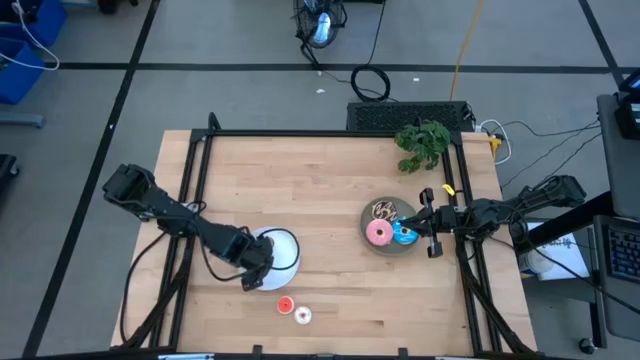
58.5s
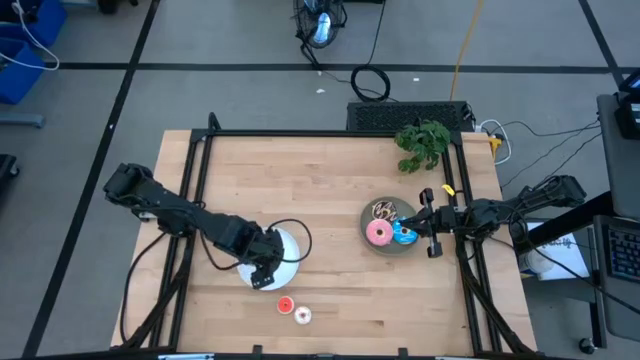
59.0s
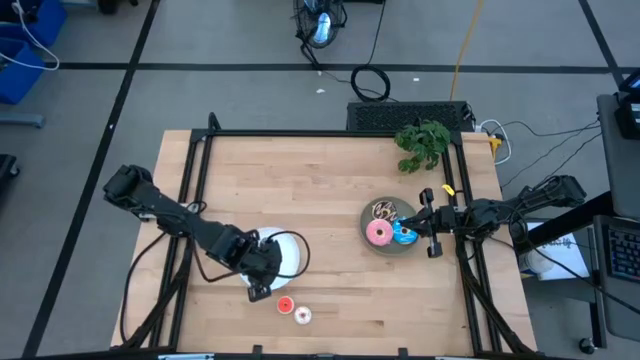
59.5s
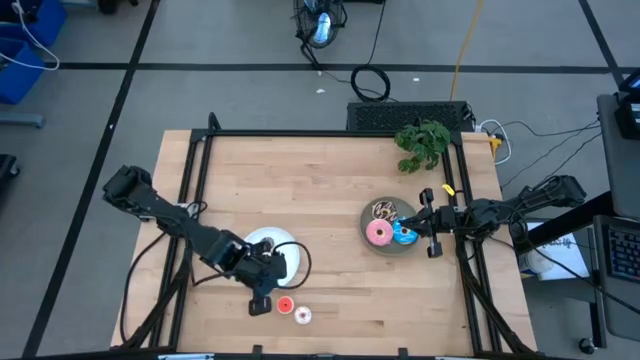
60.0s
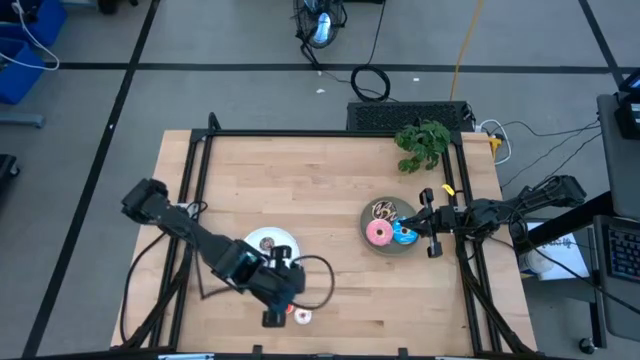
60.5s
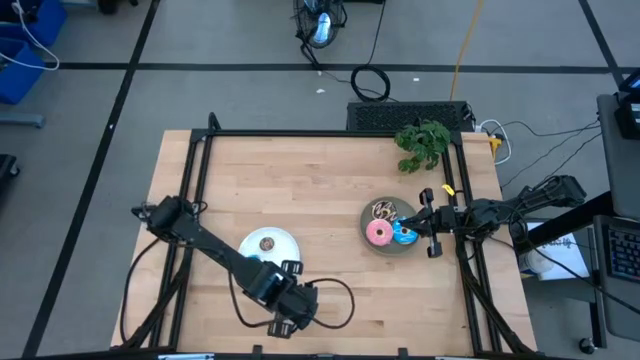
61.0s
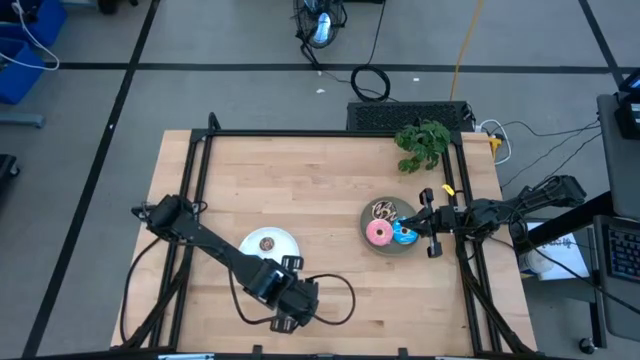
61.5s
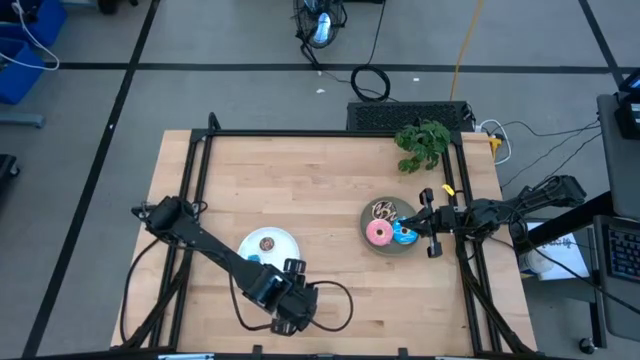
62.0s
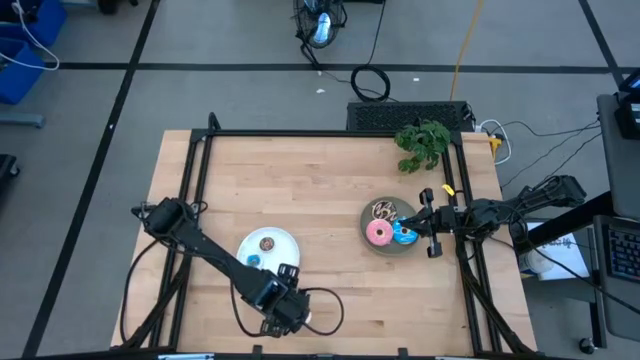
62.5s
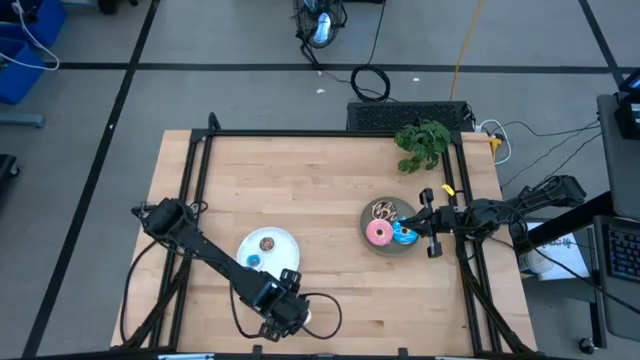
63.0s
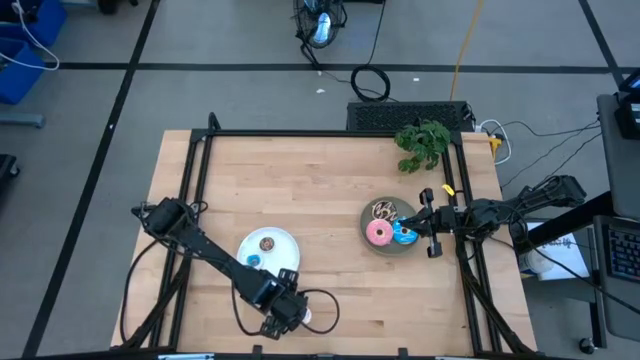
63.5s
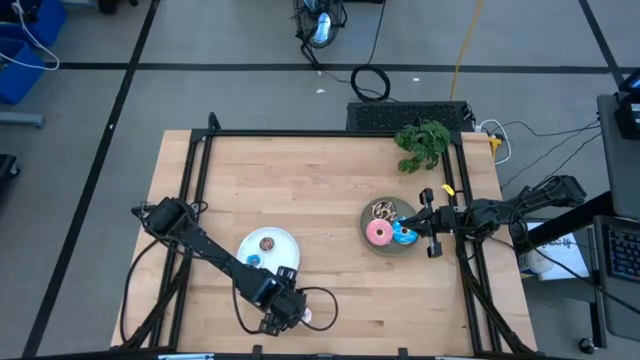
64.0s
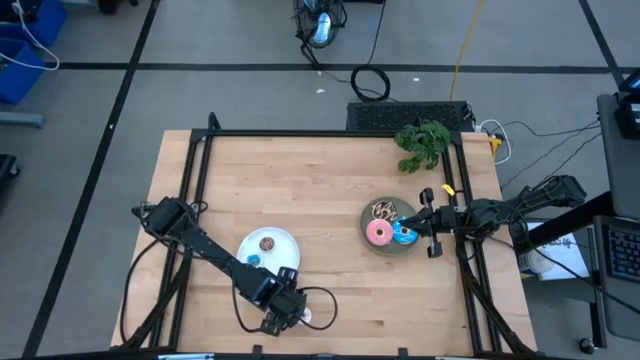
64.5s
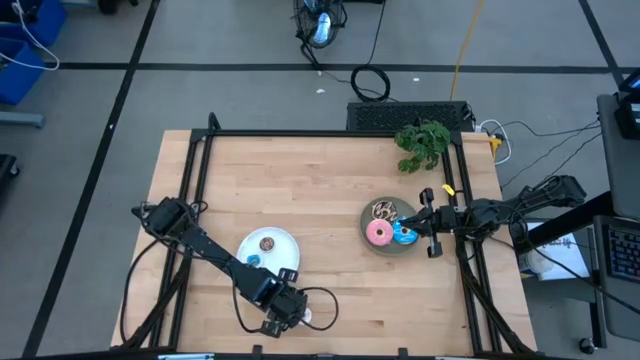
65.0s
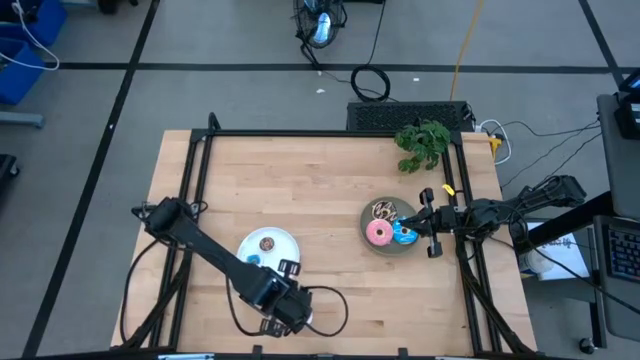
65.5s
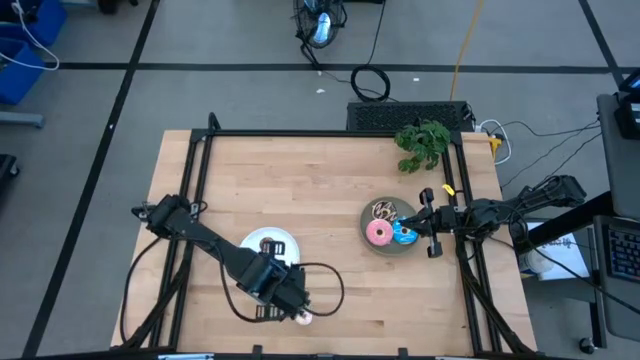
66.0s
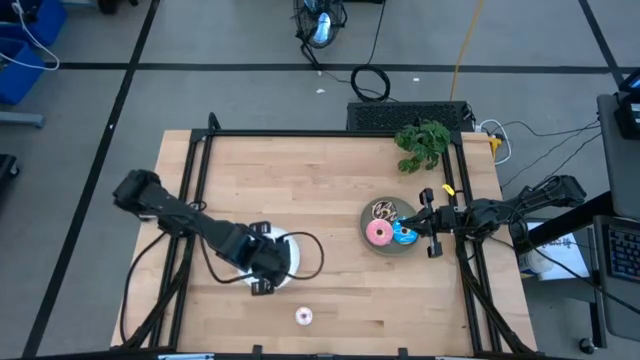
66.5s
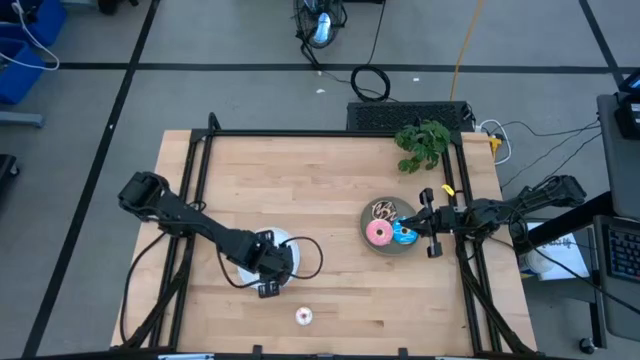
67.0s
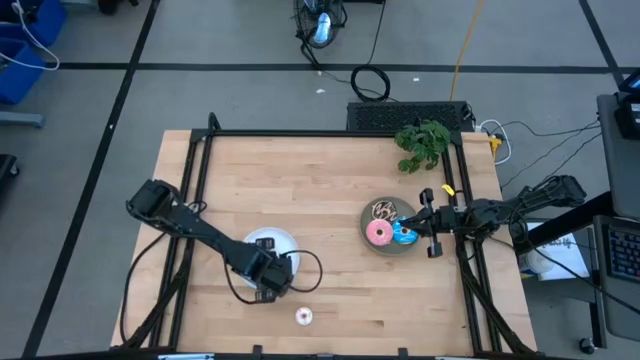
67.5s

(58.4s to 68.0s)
Task: Pick & Place donuts
Put the small orange donut on the white plate

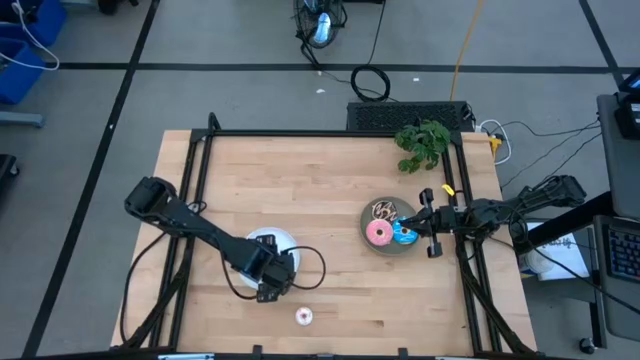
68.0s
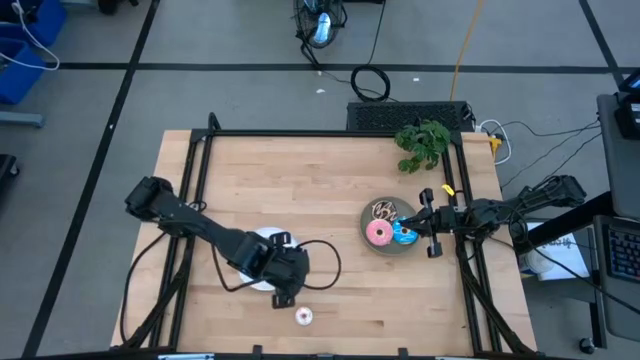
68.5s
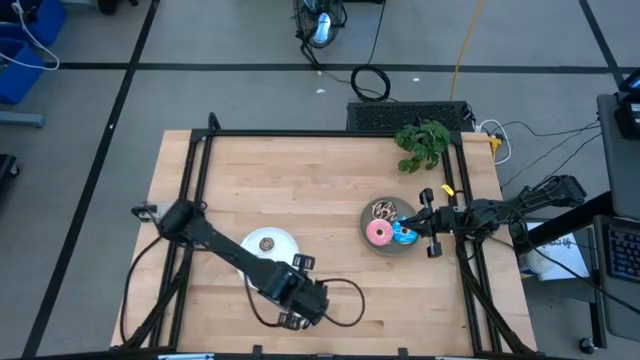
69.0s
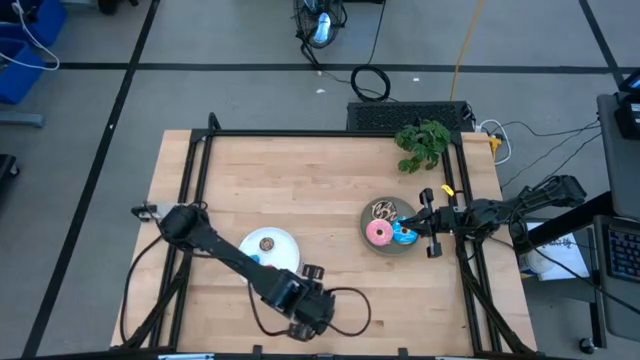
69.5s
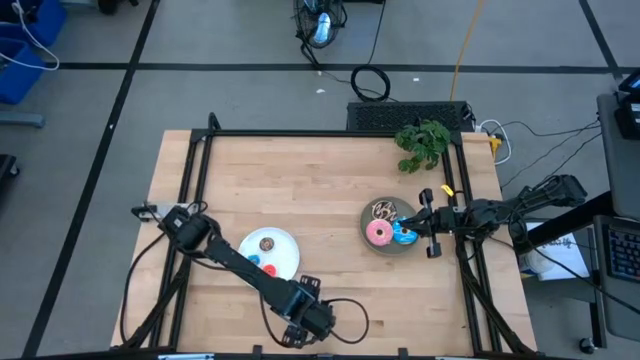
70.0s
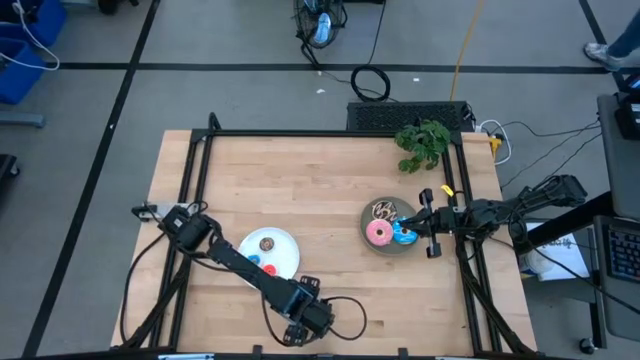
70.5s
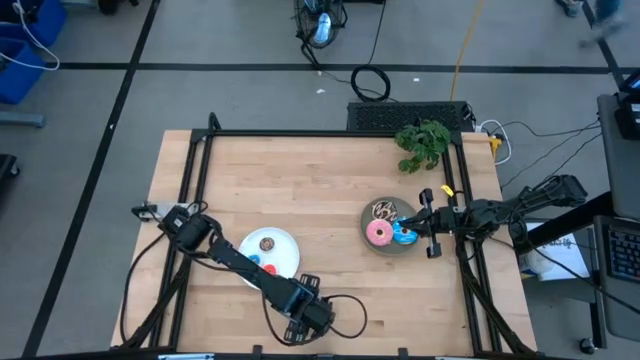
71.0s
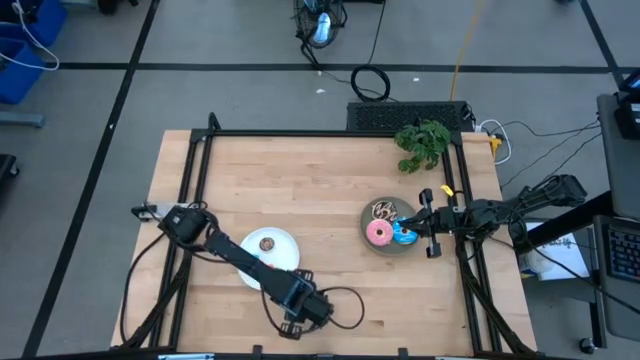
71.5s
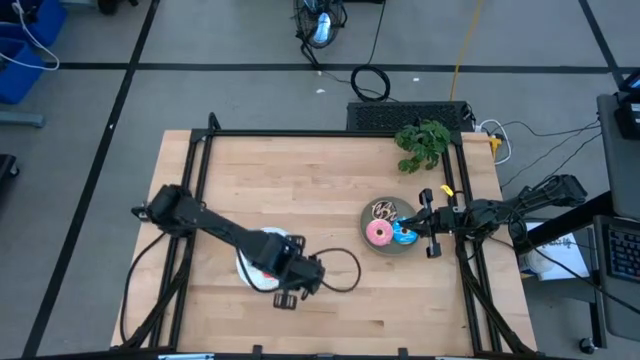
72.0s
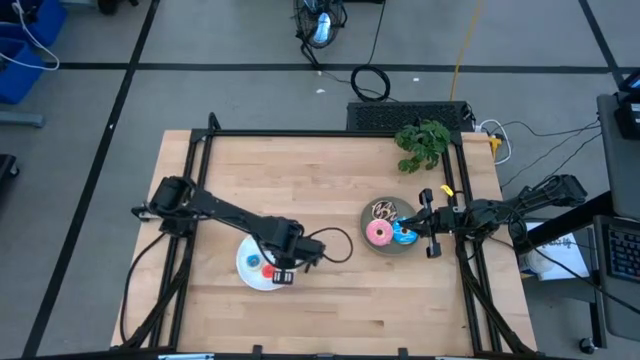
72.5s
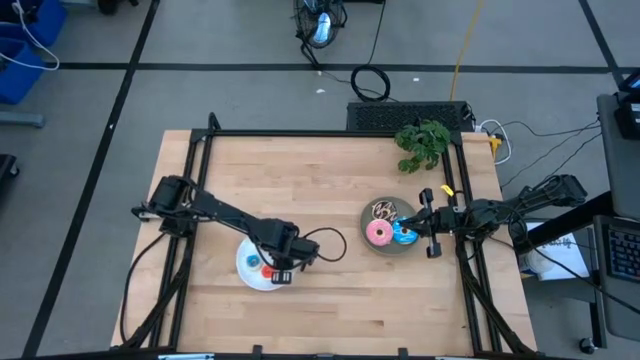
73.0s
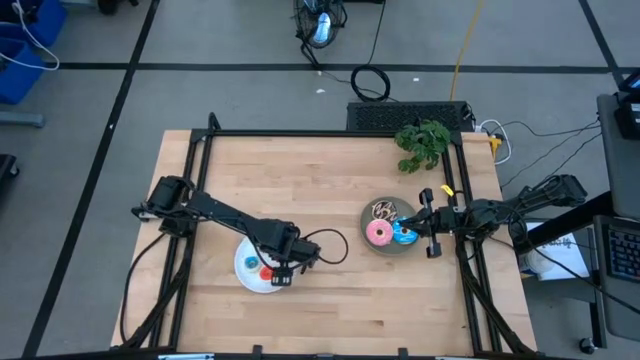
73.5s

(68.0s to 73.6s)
Put the small white donut on the white plate

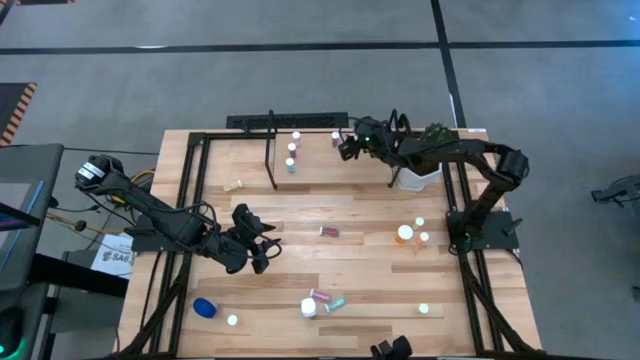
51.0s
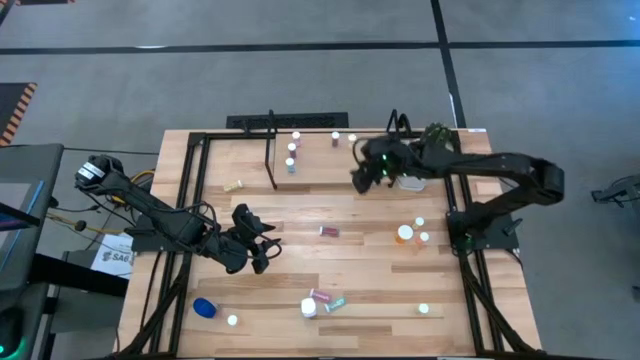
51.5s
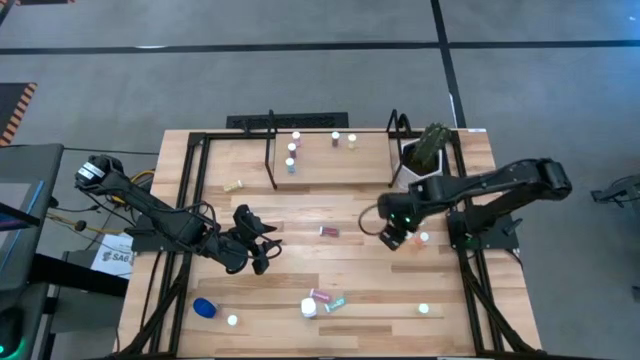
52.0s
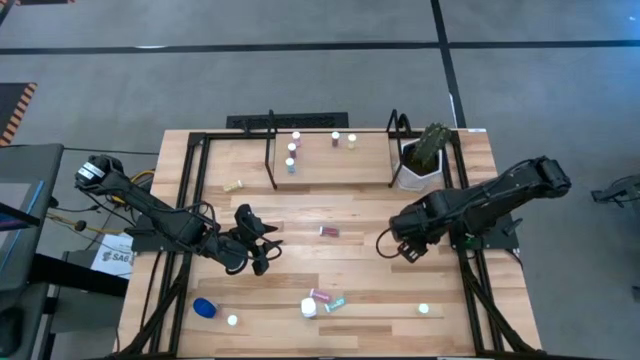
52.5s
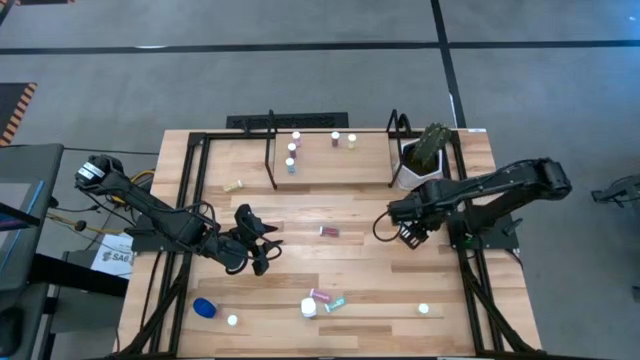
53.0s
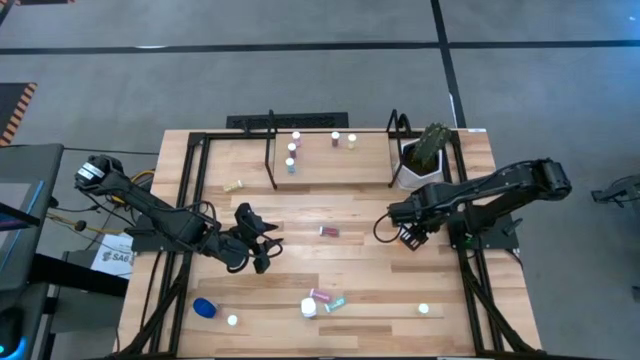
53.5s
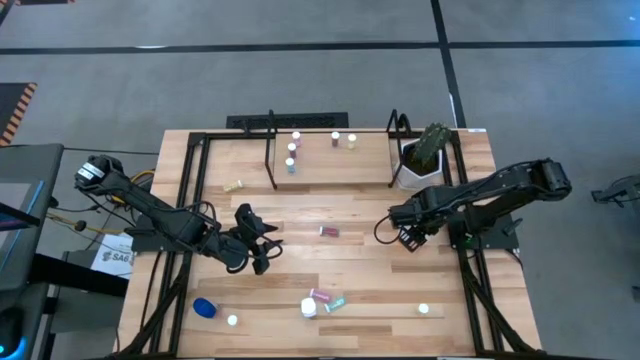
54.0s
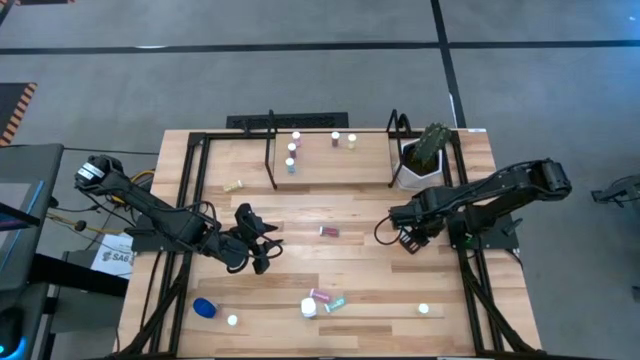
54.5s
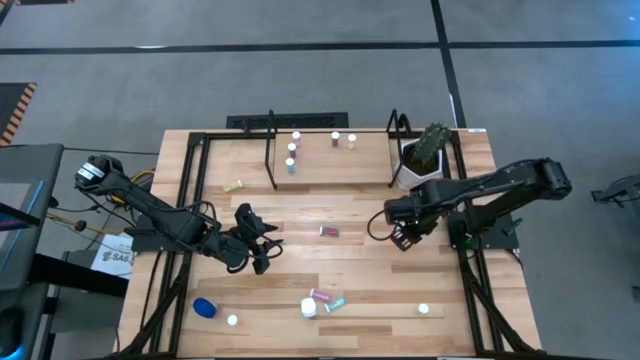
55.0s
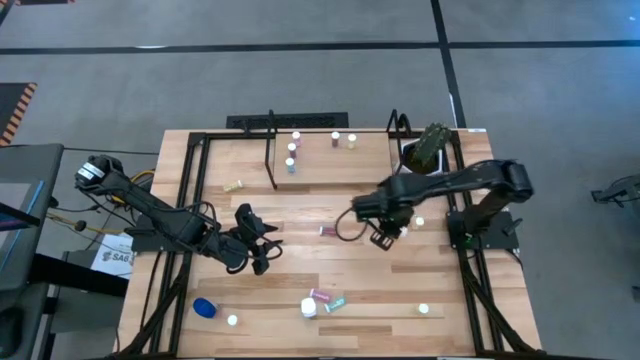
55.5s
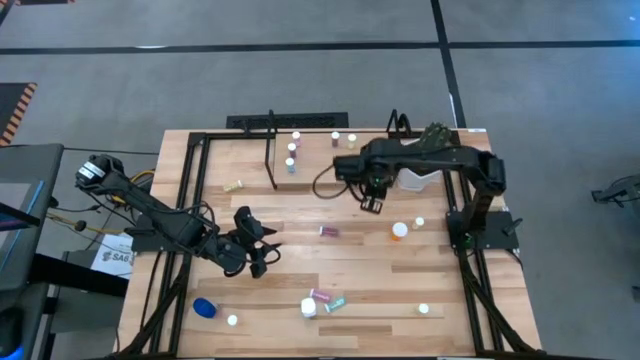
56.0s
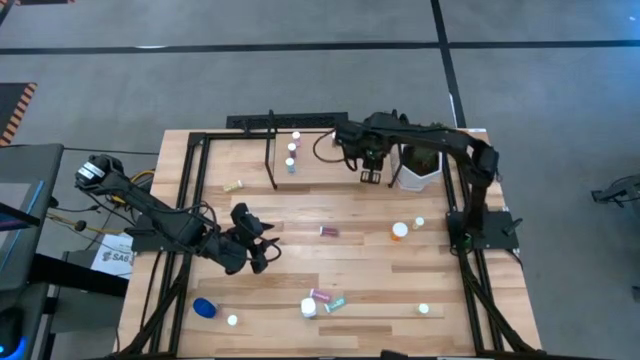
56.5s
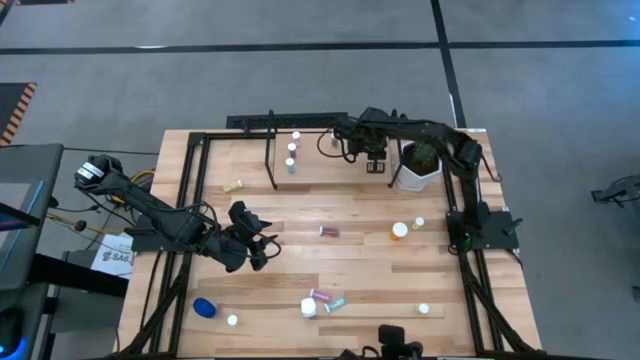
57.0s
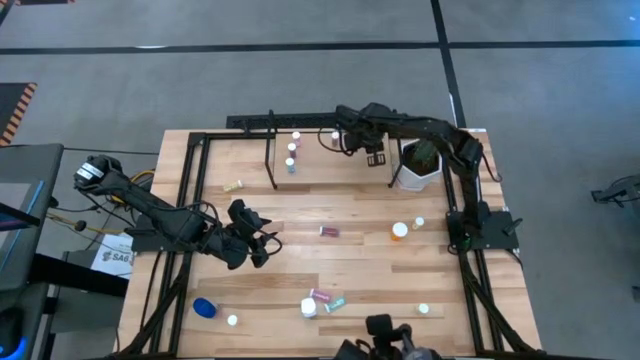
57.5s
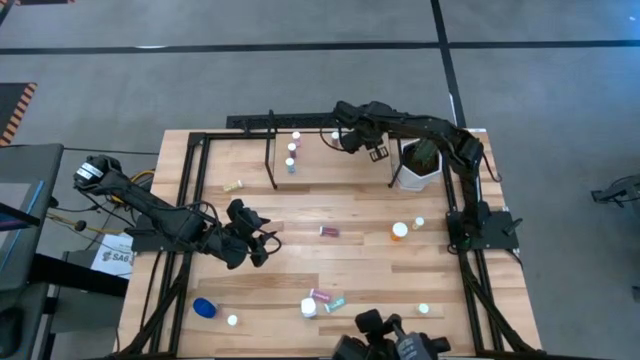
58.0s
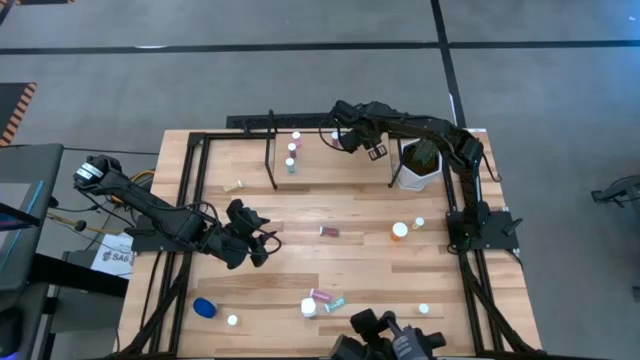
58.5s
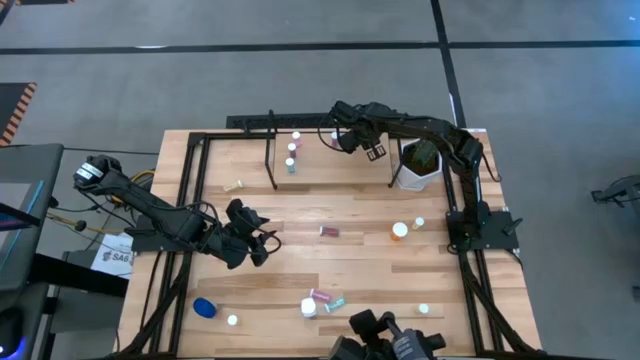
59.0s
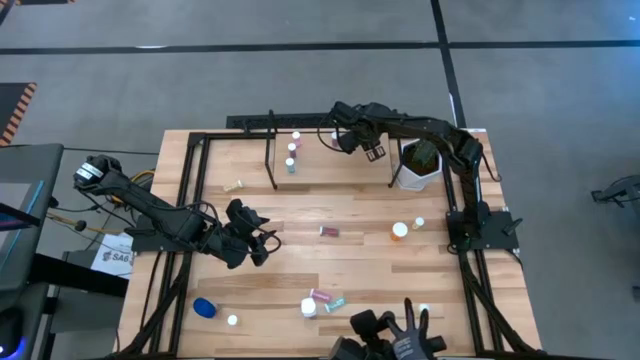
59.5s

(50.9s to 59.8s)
Task: Pick and place medicine bottles onto shelf by color
Put the light orange pill bottle on the shelf
